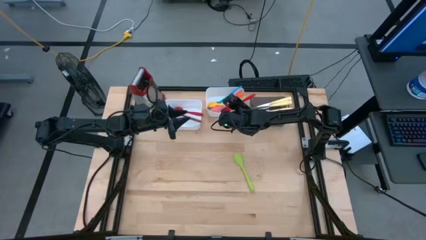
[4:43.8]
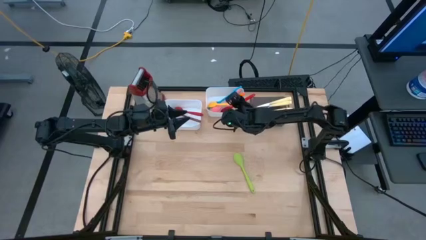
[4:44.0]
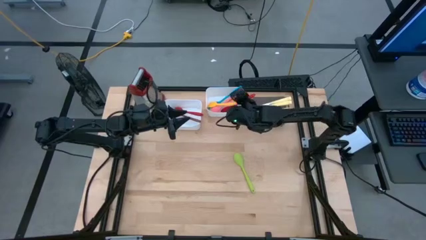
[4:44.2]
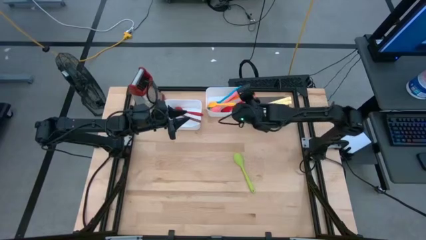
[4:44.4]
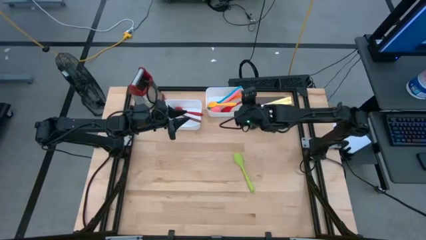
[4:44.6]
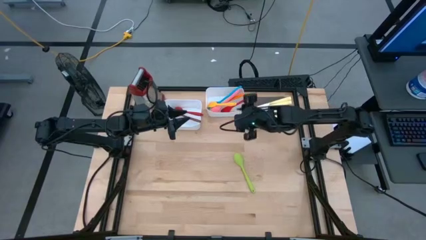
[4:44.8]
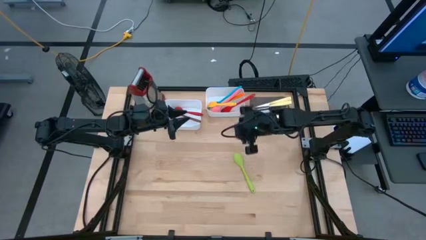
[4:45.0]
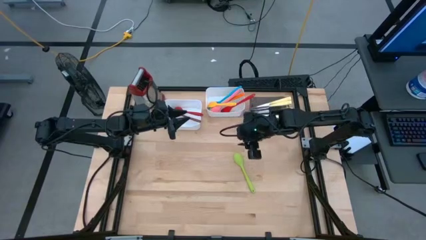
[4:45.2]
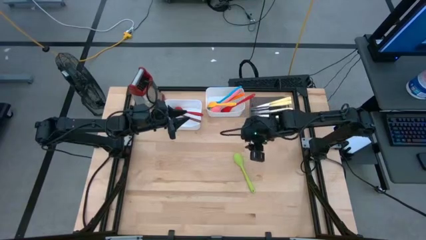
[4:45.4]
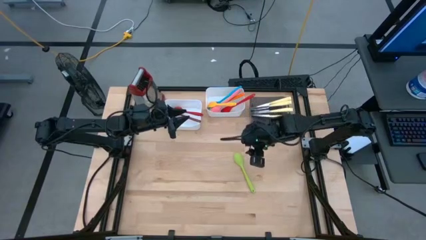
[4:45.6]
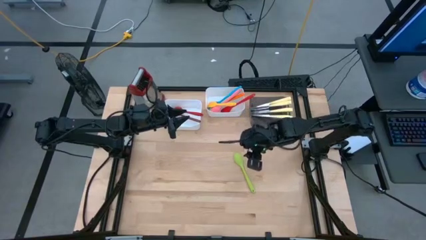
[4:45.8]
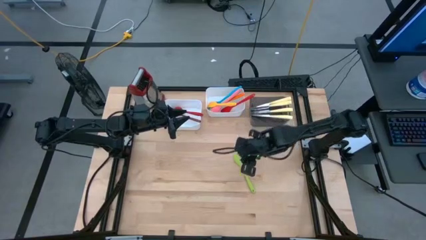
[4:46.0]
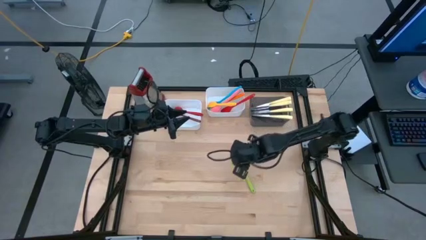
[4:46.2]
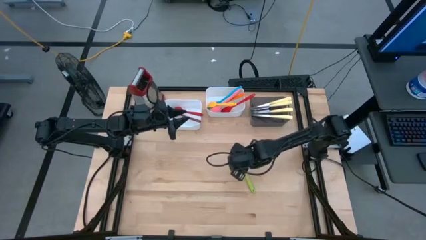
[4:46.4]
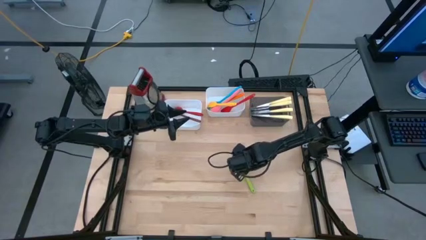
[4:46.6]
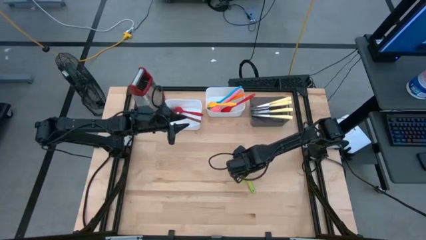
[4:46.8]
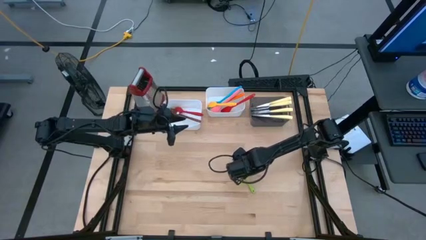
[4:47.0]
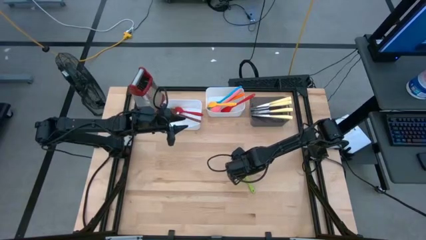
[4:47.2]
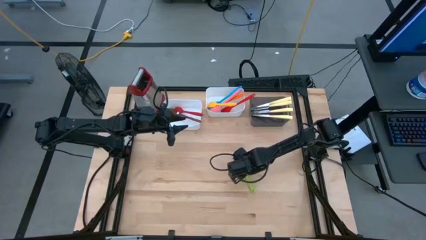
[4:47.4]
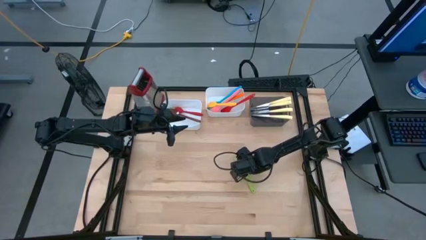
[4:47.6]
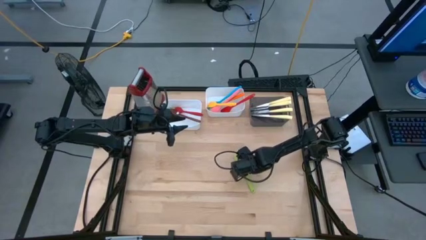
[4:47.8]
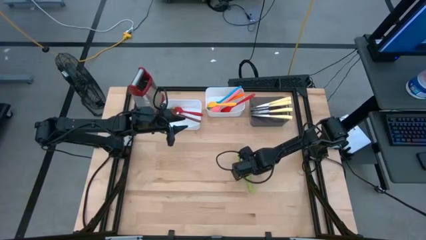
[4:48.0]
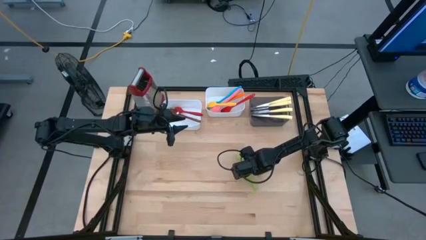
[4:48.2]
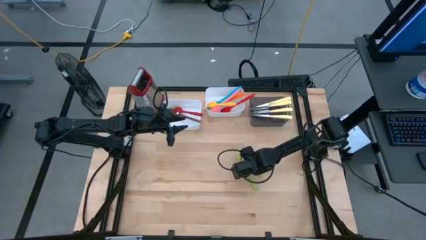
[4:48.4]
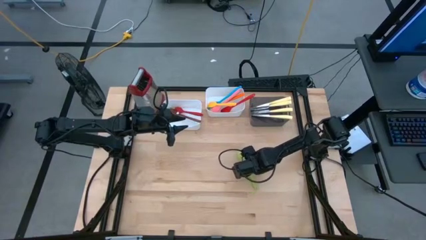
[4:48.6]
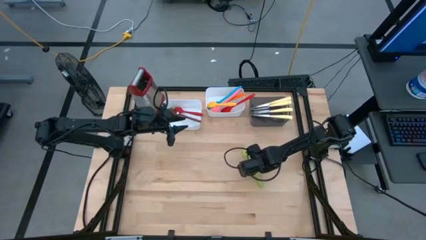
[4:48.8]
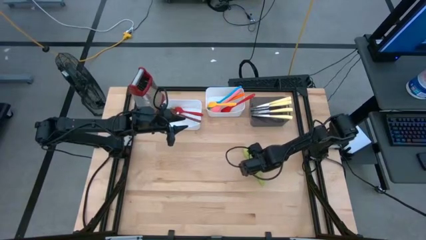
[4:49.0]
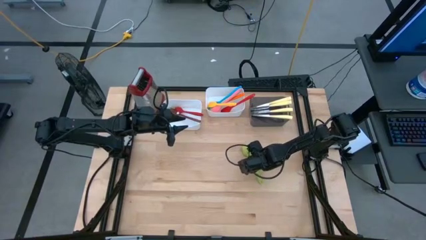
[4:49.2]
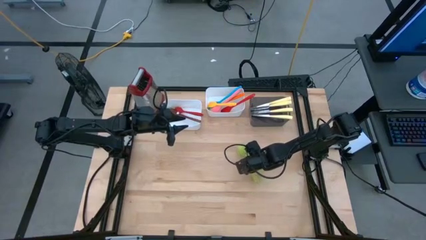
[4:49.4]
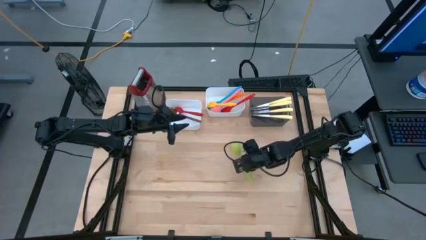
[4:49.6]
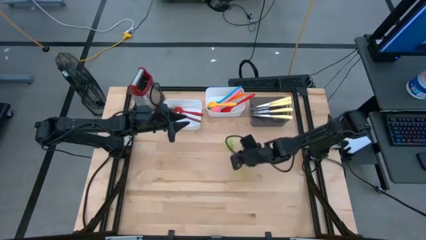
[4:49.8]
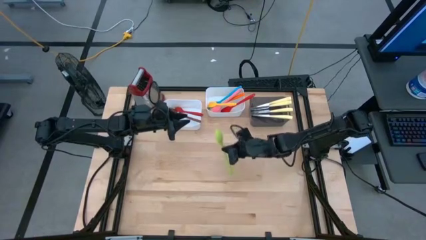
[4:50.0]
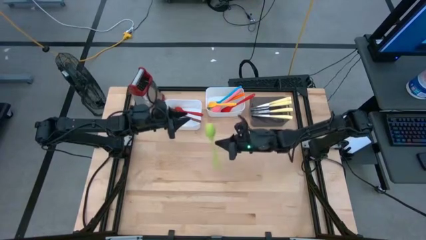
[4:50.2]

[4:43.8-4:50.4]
Task: Pick & Place Kitchen Items
Put the green serving spoon into the left white bin
